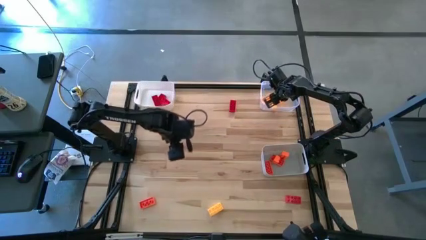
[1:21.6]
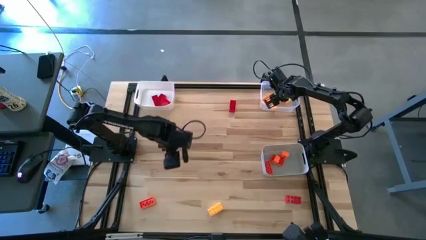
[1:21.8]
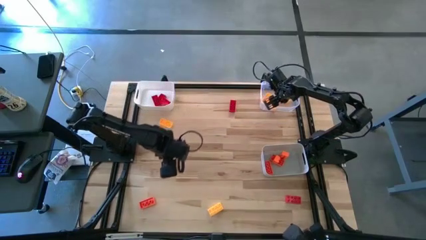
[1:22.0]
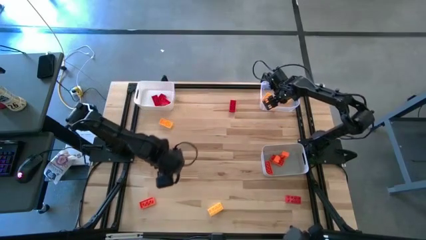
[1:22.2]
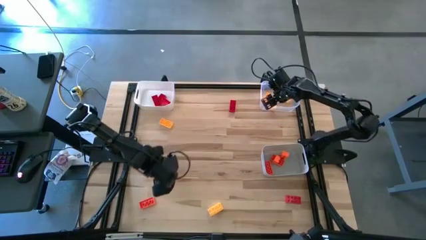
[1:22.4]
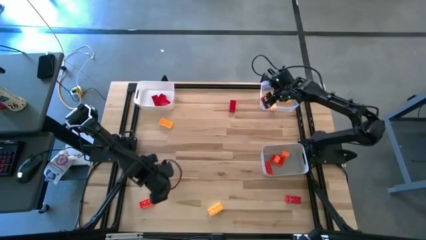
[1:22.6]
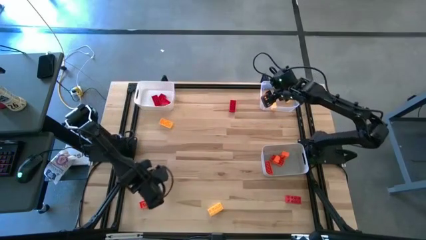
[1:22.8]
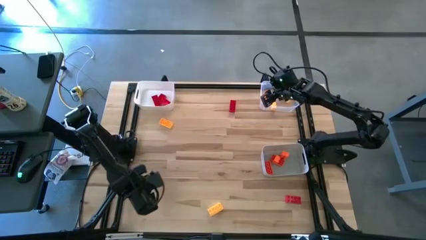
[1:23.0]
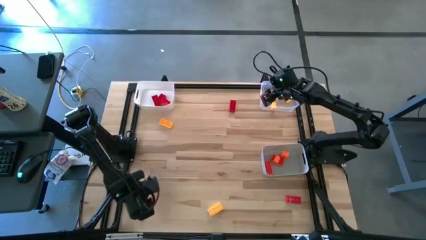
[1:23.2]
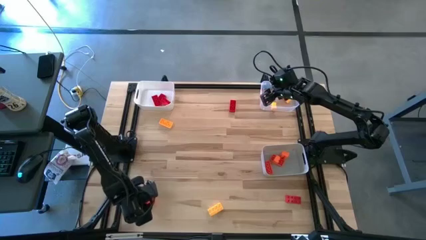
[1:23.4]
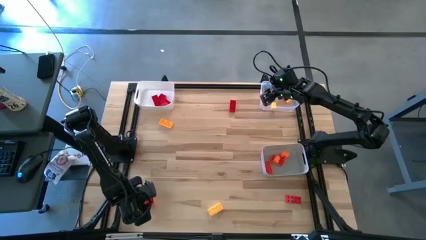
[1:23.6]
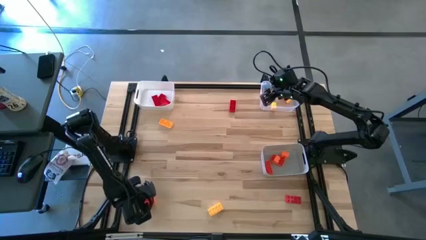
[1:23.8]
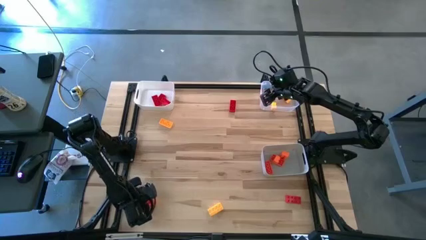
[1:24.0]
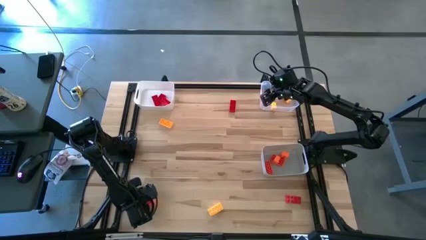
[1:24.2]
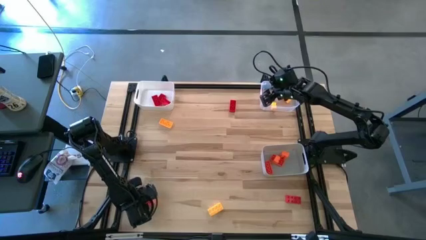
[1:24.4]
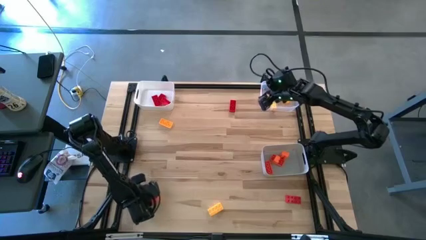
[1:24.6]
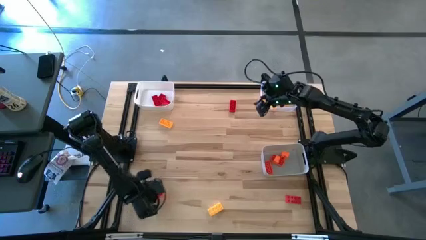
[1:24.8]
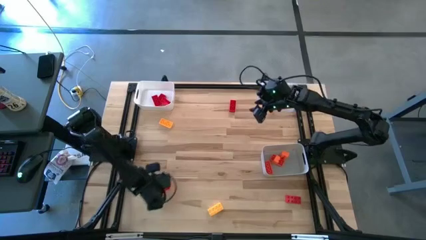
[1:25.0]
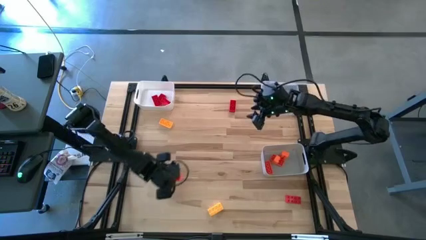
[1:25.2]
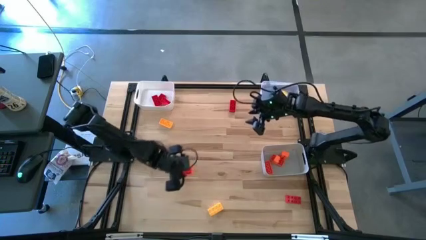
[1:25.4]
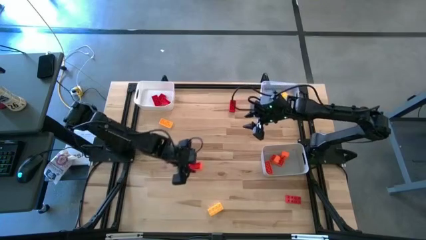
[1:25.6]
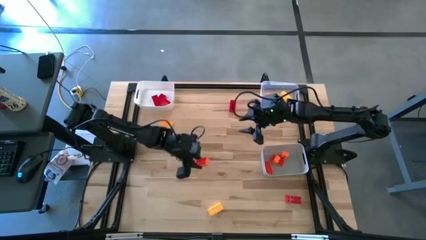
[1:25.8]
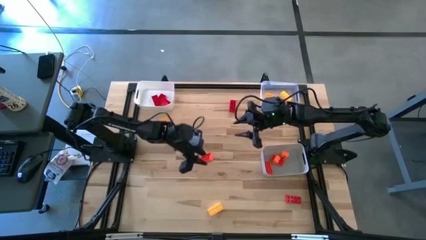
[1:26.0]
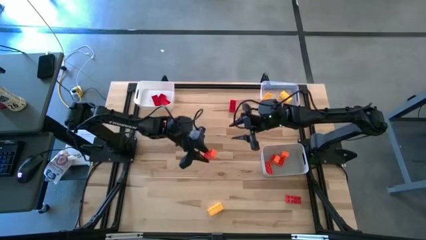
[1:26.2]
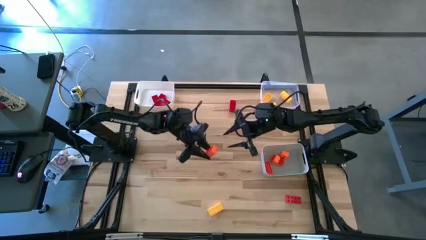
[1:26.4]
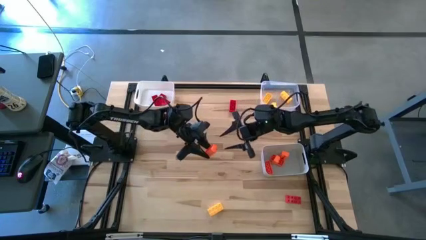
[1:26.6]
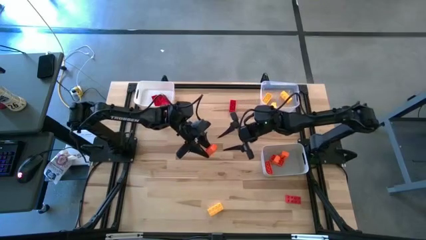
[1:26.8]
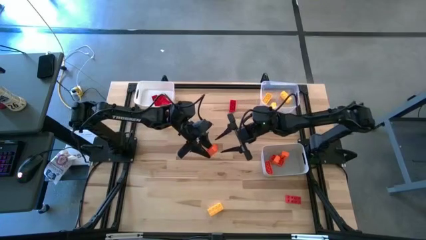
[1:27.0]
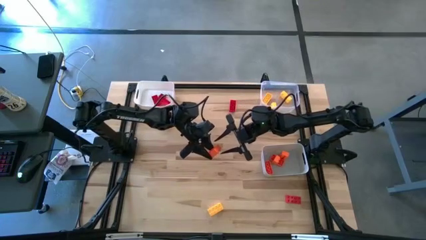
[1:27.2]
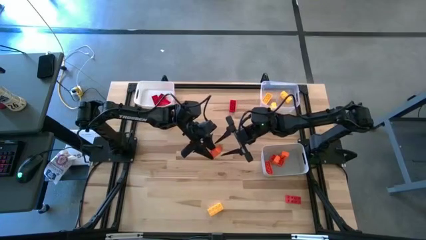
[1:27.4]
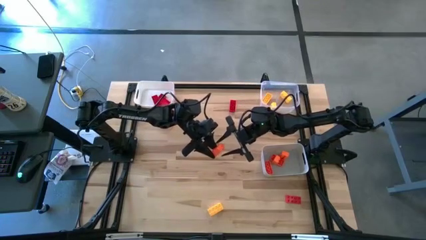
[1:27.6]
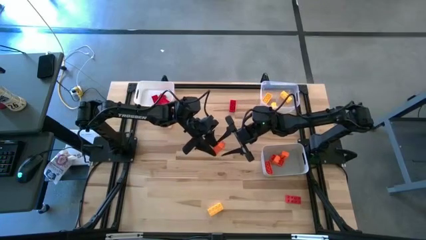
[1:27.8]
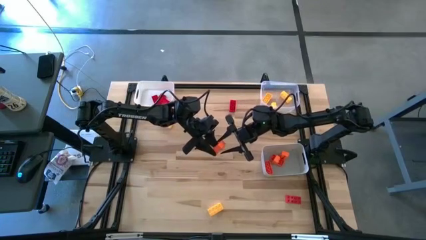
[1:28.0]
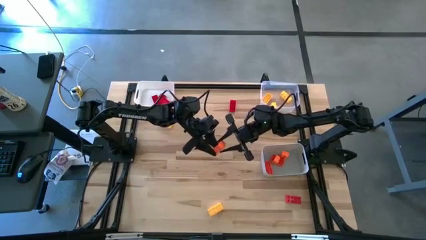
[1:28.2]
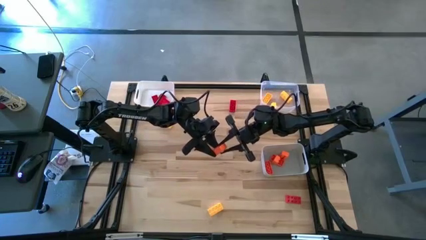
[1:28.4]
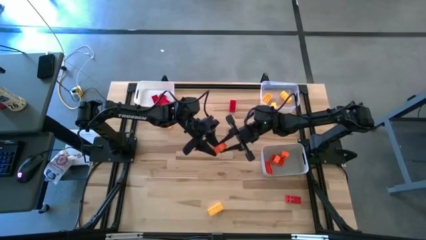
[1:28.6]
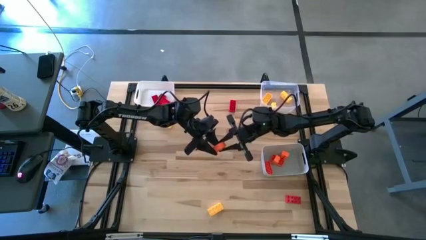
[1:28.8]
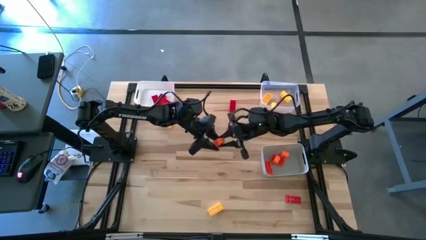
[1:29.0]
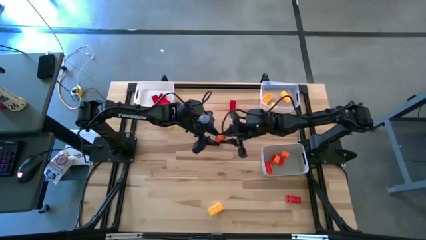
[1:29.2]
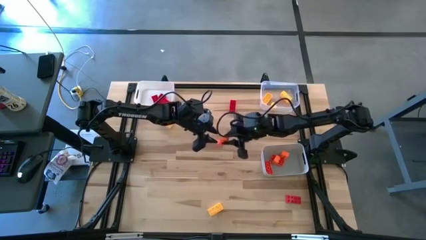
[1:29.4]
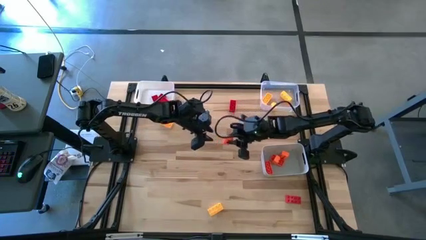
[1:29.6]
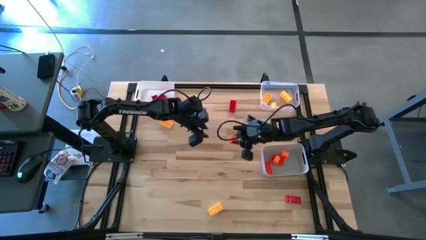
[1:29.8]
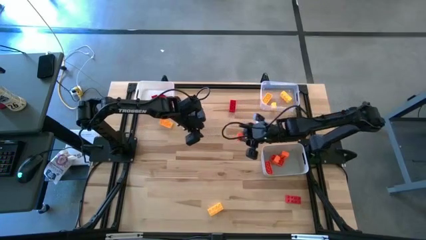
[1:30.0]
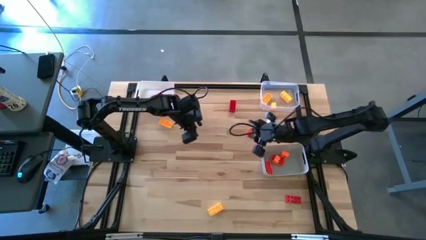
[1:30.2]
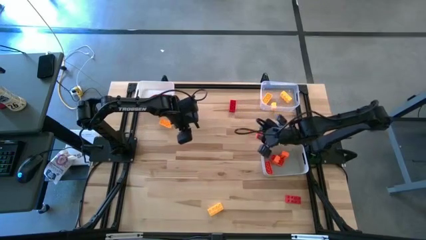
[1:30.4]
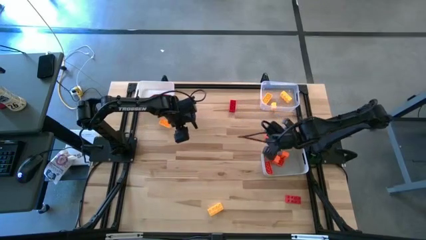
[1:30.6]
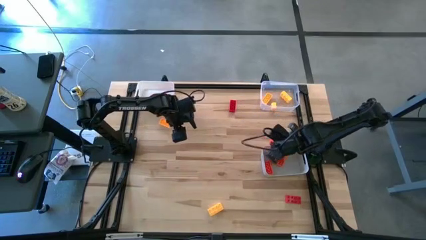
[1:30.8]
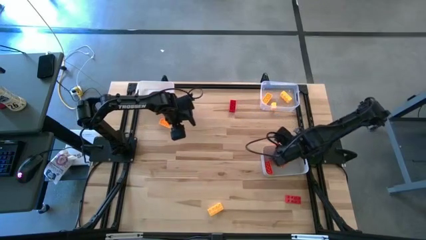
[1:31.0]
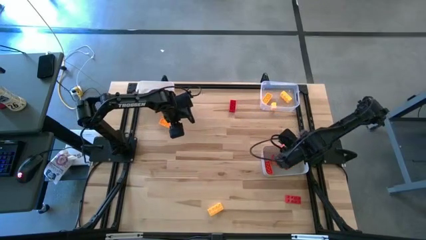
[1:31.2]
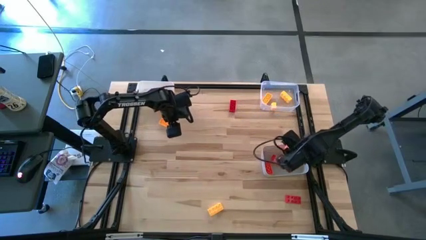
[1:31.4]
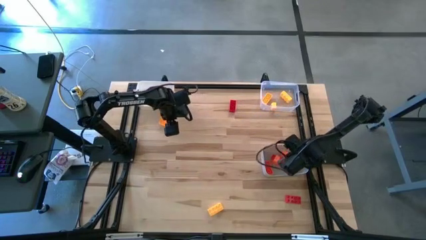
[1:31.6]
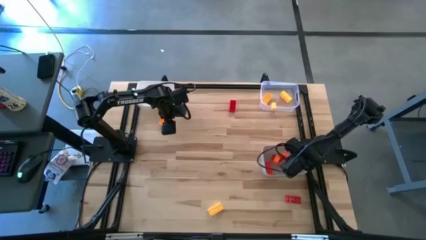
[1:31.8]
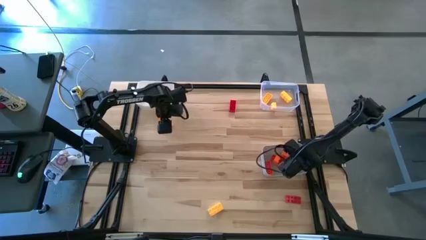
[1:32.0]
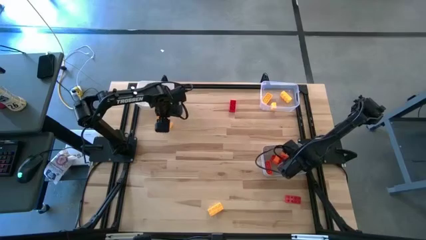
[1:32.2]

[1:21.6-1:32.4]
Task: Sort & place blocks by color
Put the orange game piece into the gray bin

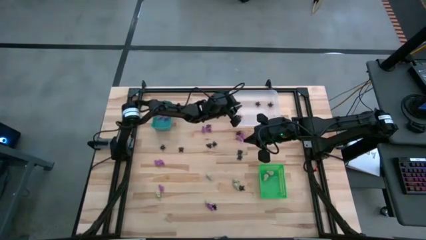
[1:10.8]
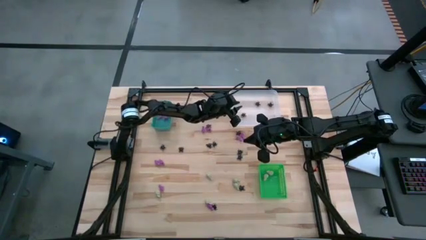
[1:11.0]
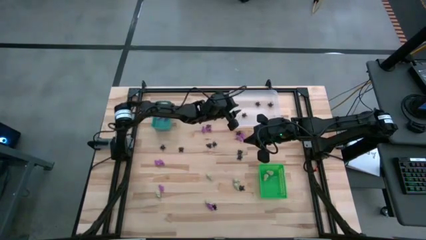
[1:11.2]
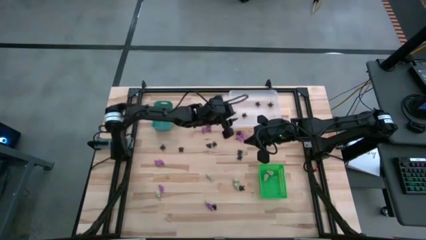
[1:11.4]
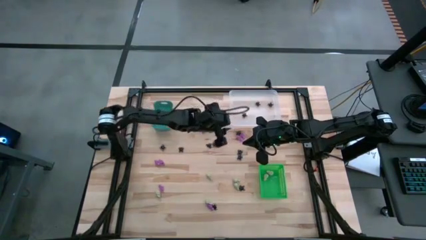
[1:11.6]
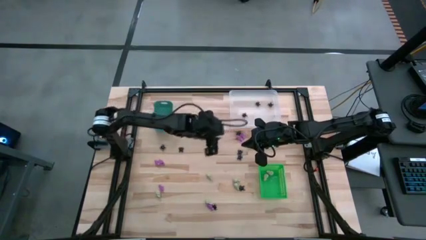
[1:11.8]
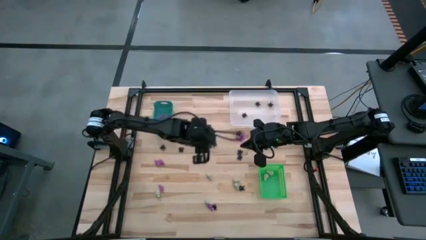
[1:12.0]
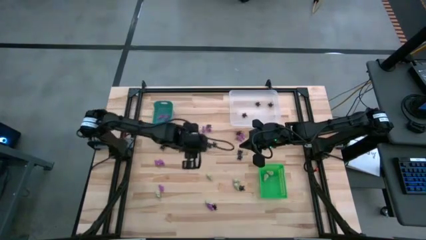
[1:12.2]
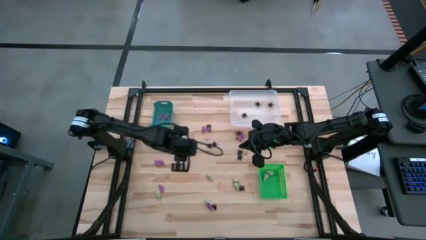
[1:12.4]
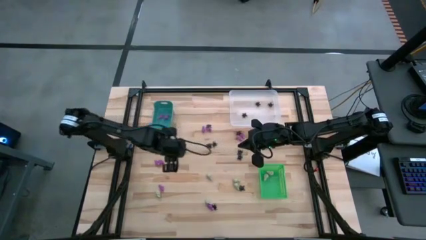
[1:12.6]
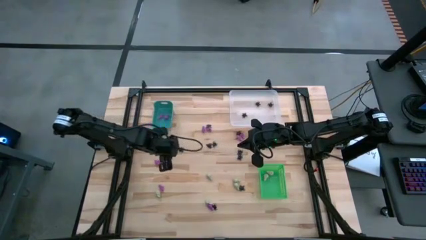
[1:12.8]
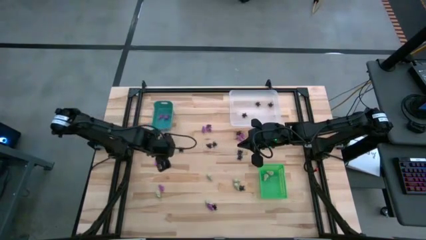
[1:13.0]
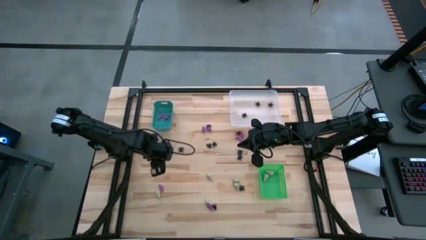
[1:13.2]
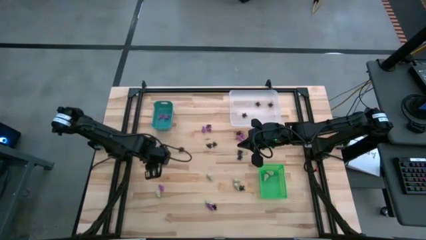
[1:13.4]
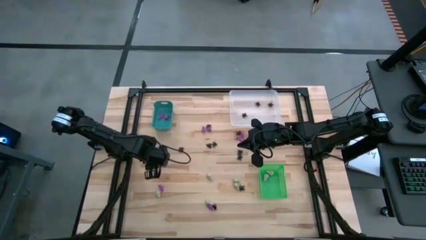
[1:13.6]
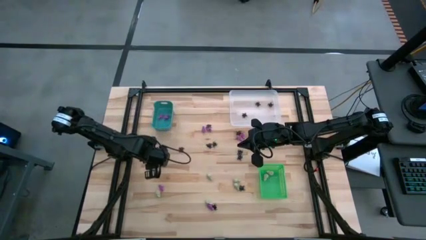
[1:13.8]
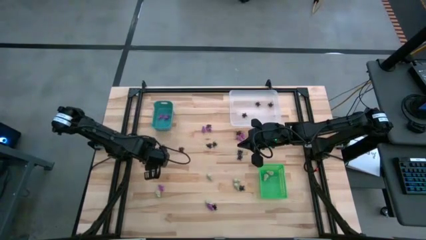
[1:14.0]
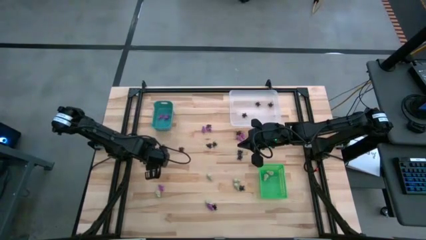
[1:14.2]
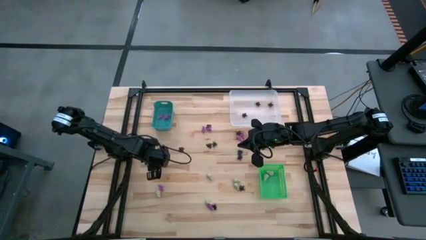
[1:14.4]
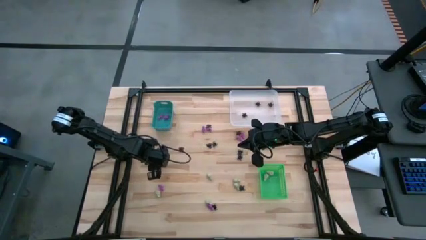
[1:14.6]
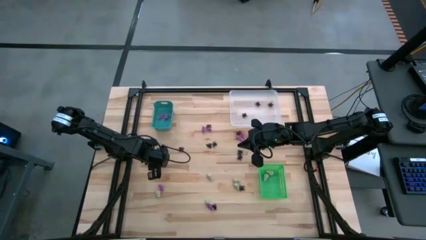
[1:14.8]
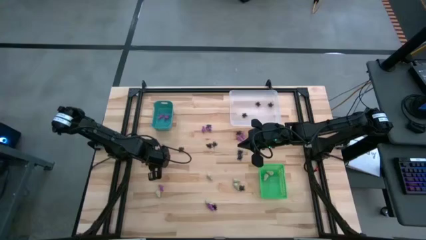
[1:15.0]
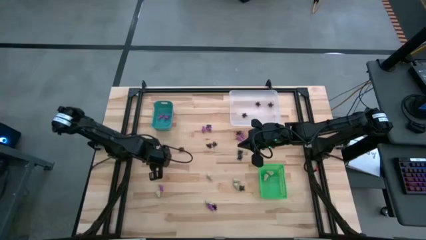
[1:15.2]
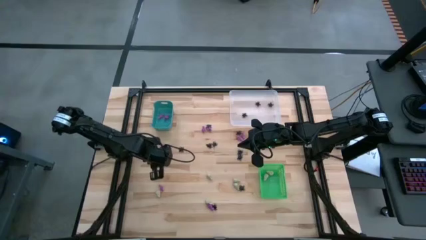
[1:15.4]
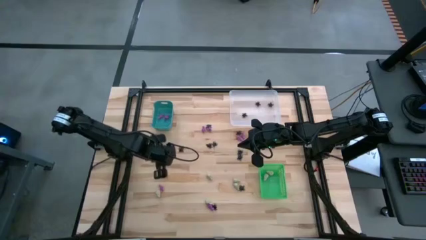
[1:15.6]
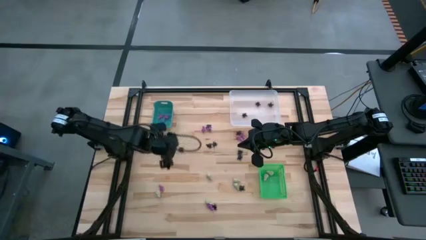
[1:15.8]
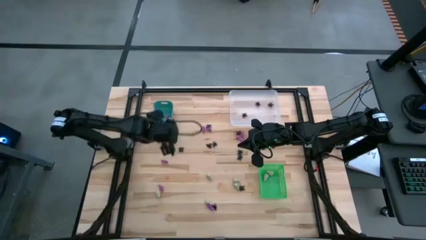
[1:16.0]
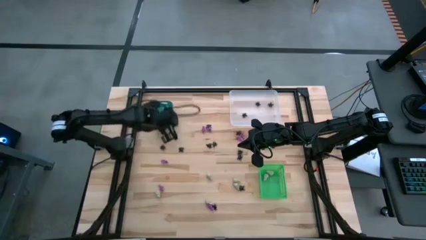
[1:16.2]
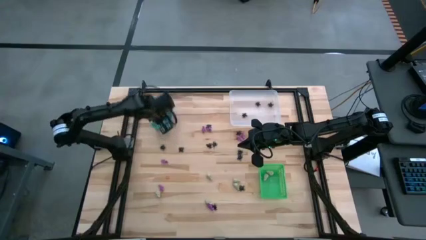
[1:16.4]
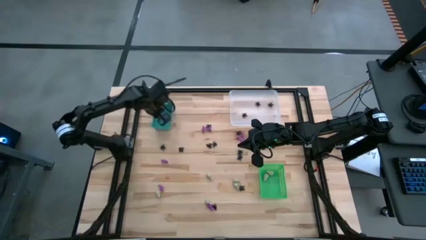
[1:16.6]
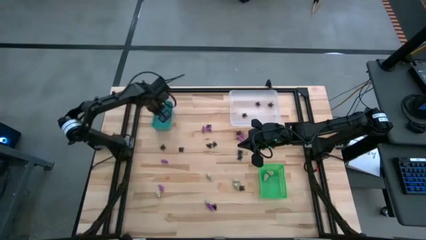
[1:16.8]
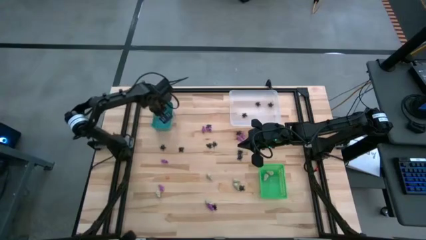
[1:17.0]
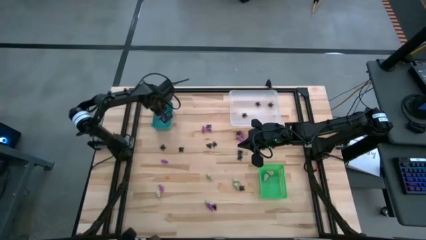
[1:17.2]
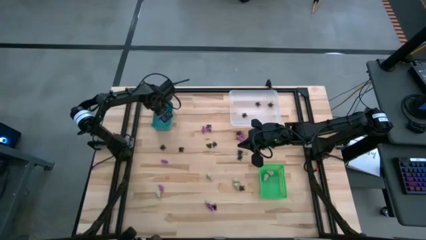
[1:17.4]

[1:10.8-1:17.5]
Task: Sort Halloween decoration
Put the purple skeleton toy into the blue bin
